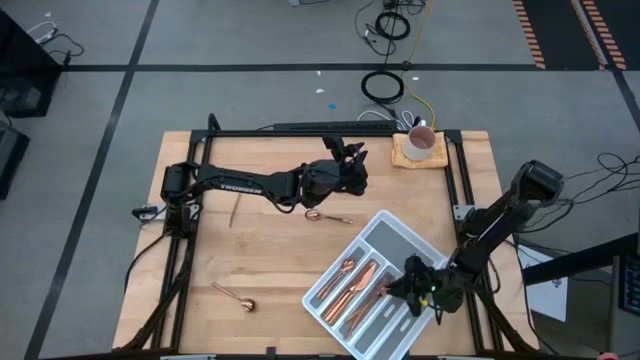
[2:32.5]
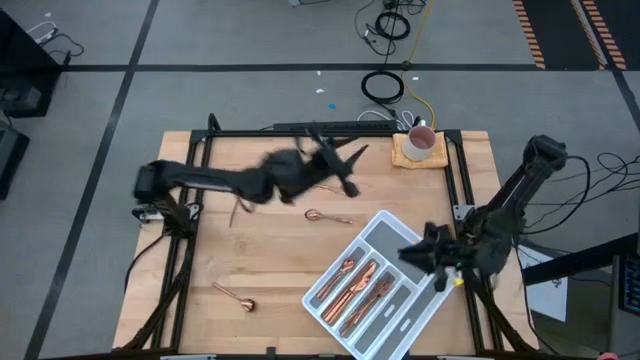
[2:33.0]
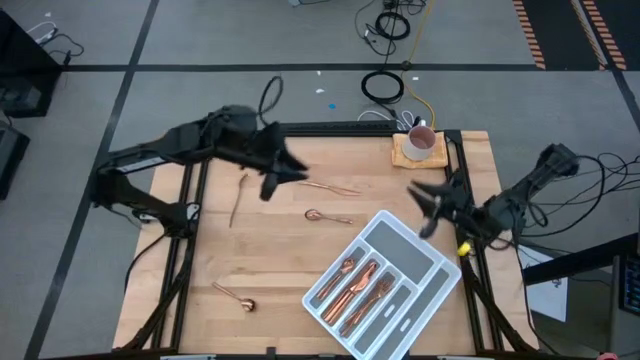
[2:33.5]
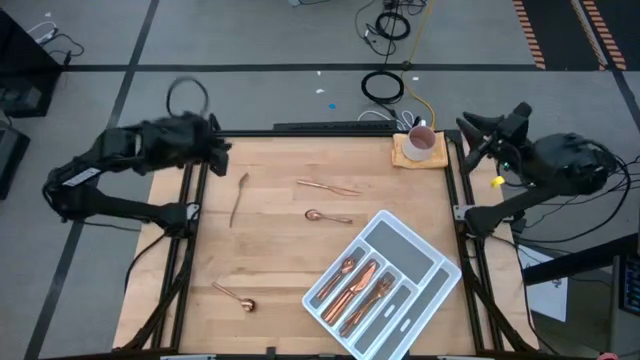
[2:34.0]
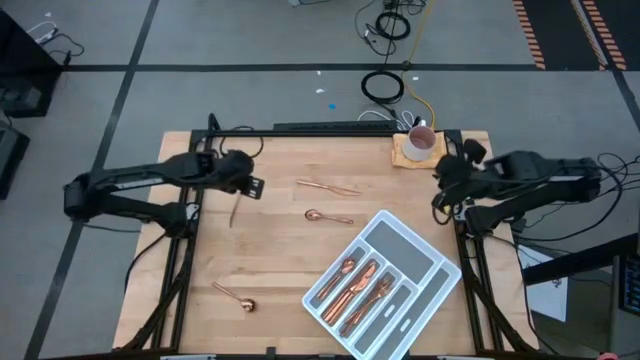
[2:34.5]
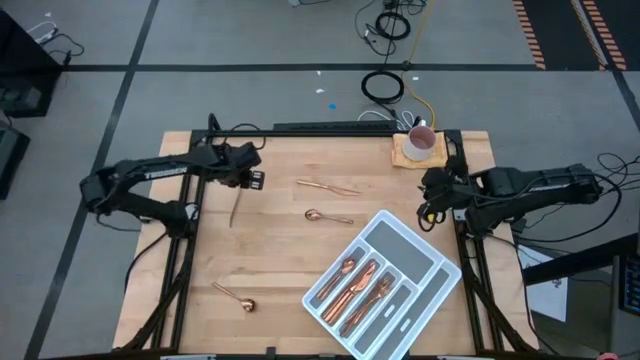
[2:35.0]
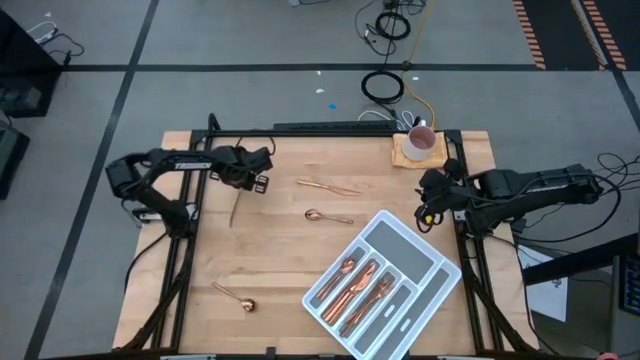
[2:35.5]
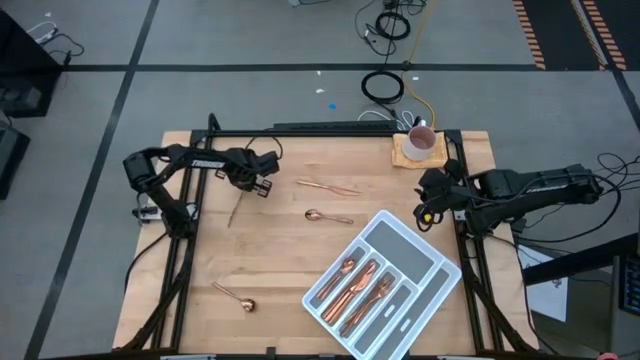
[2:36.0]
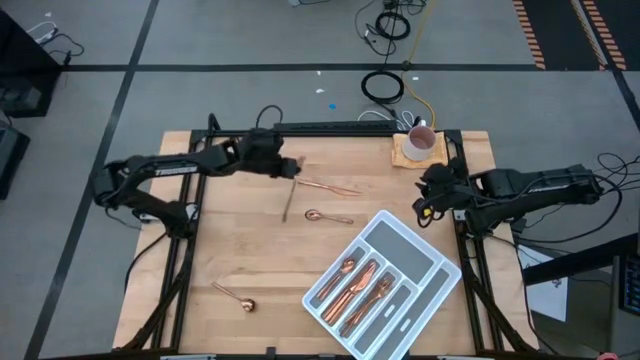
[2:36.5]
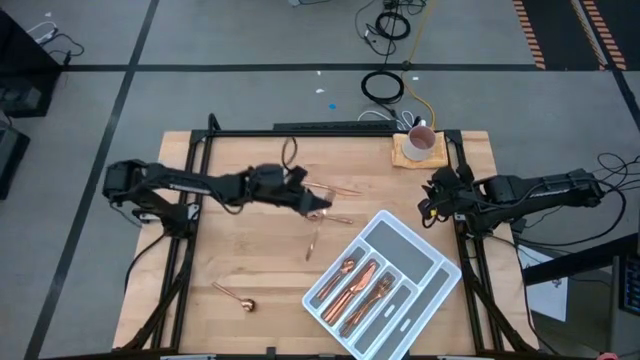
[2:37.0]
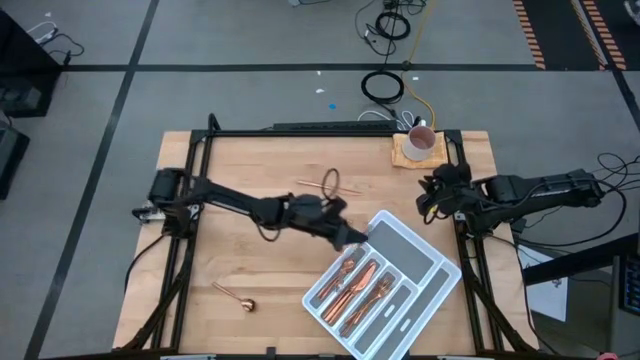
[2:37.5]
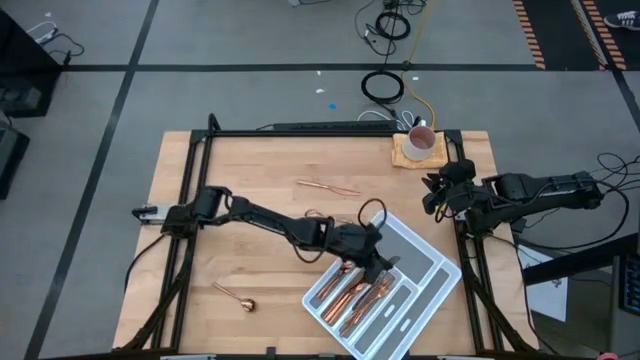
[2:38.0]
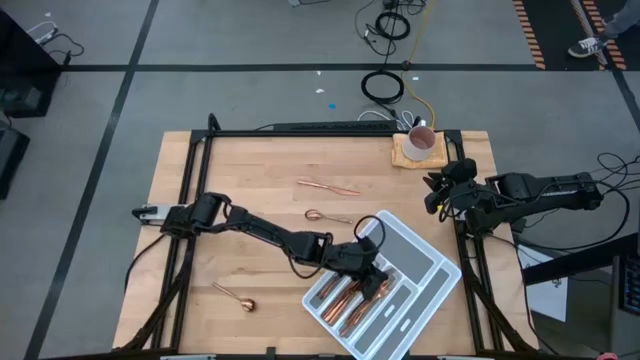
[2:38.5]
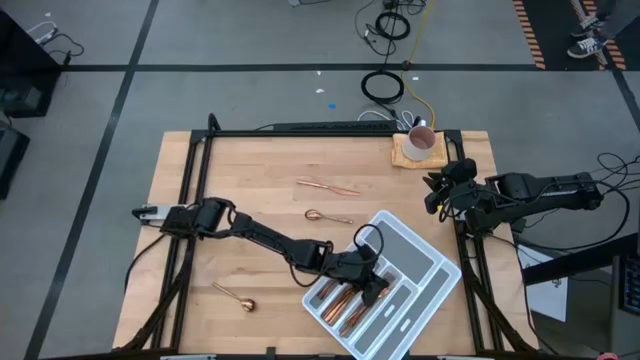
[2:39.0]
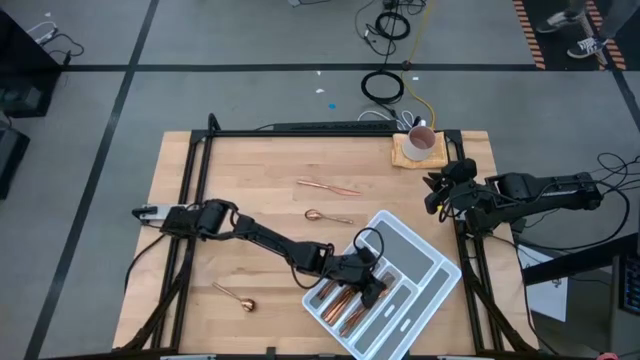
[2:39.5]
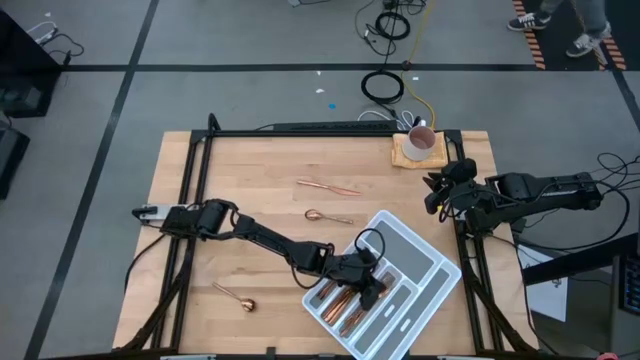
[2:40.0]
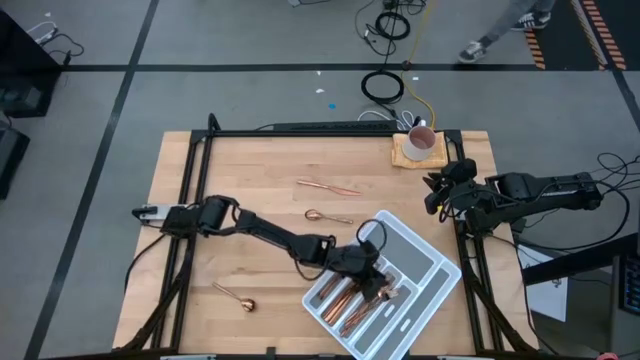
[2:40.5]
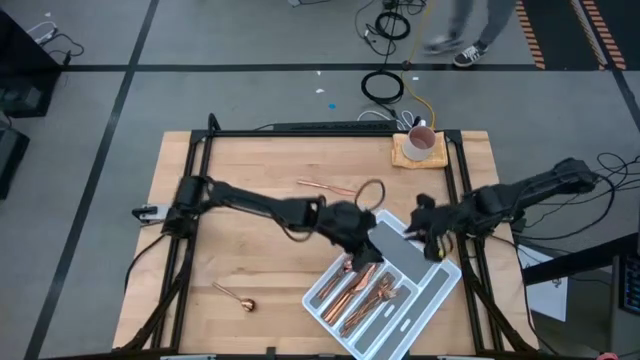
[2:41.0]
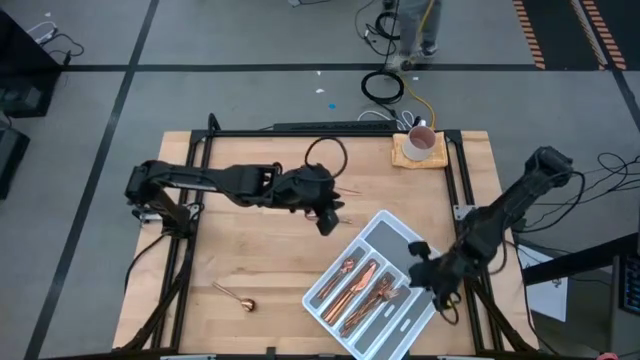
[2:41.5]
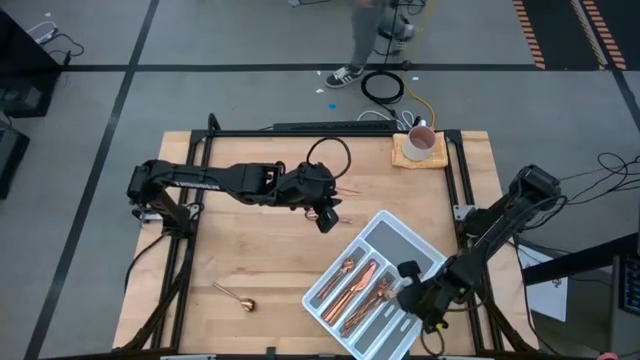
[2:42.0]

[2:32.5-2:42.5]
Task: Sort silverware
Put the gold fork into the cutlery tray with the other gold forks

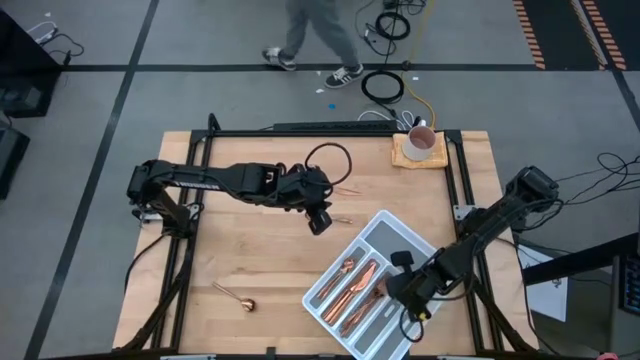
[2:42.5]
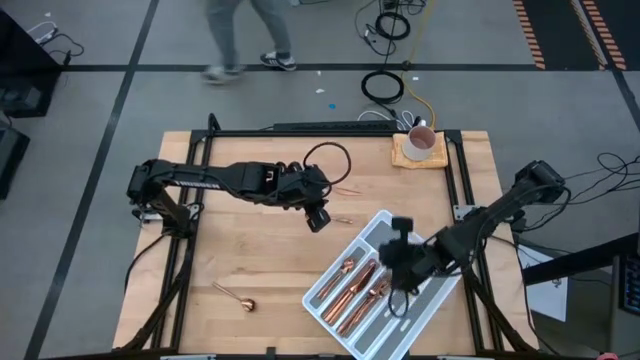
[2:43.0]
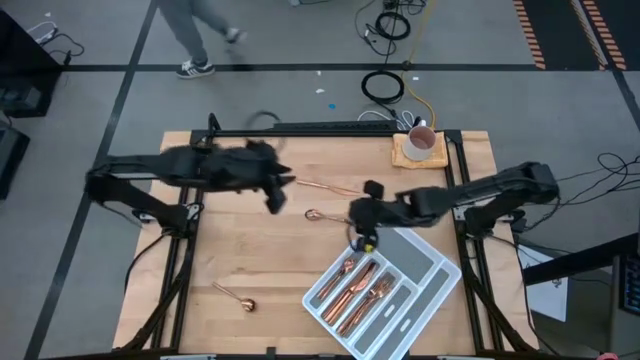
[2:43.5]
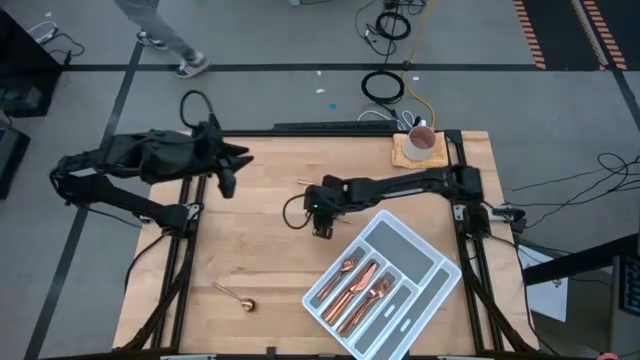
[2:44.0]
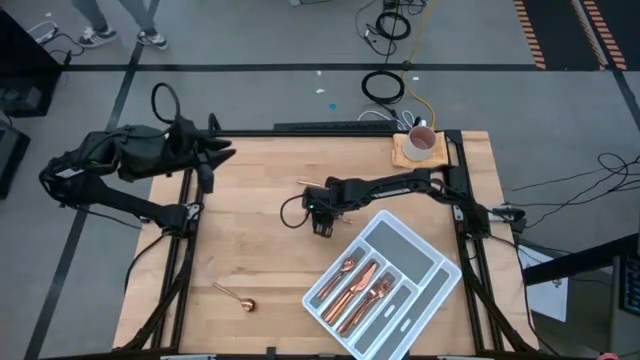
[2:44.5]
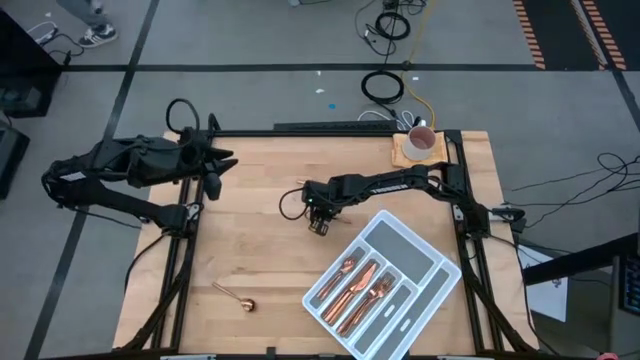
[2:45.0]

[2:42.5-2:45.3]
Put the gold spoon into the cutlery tray with the other gold spoons

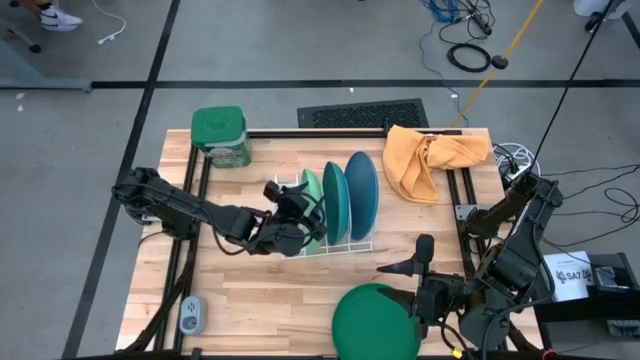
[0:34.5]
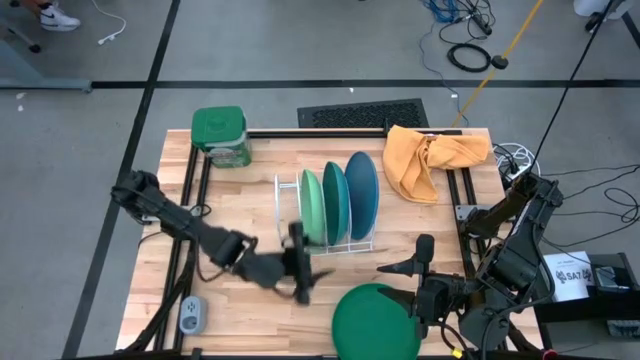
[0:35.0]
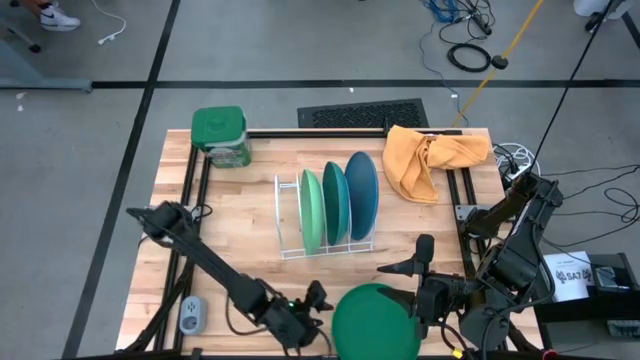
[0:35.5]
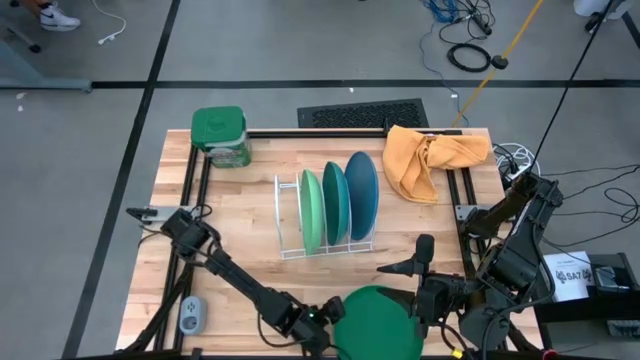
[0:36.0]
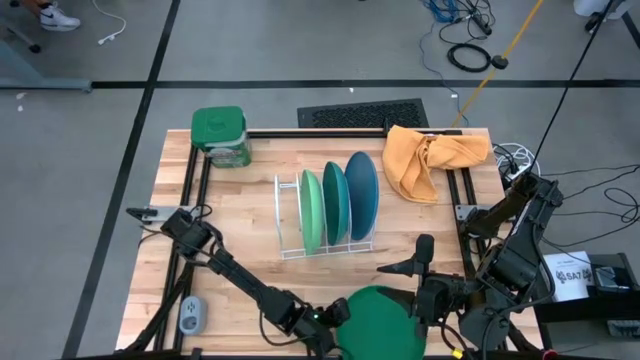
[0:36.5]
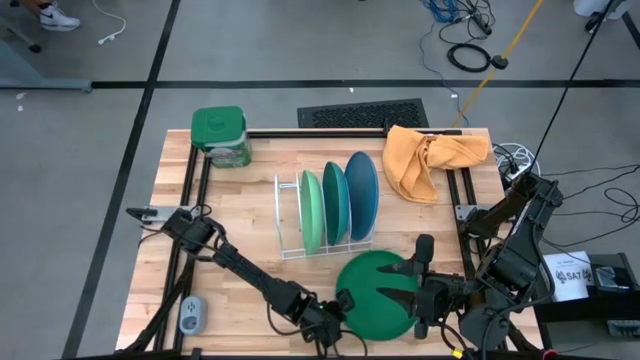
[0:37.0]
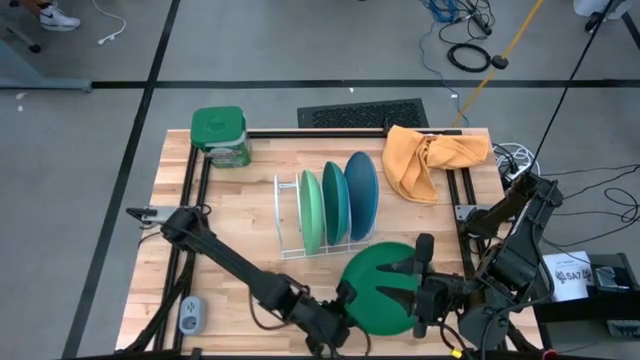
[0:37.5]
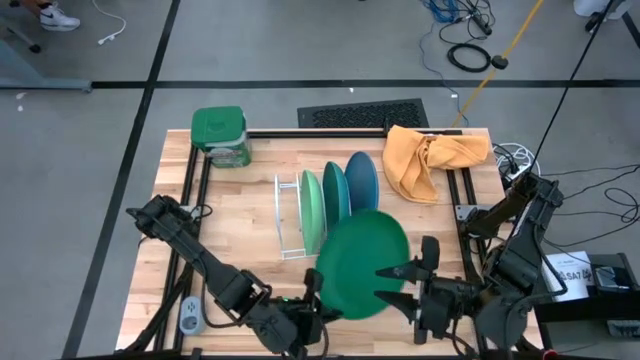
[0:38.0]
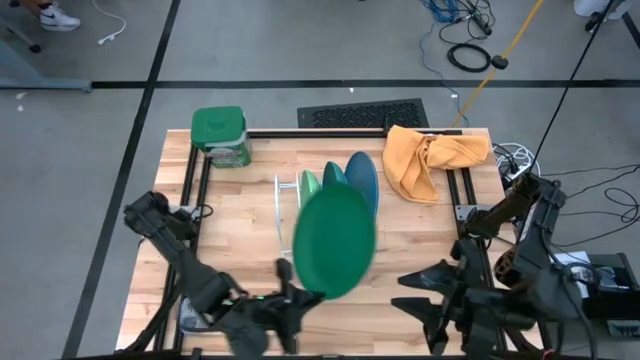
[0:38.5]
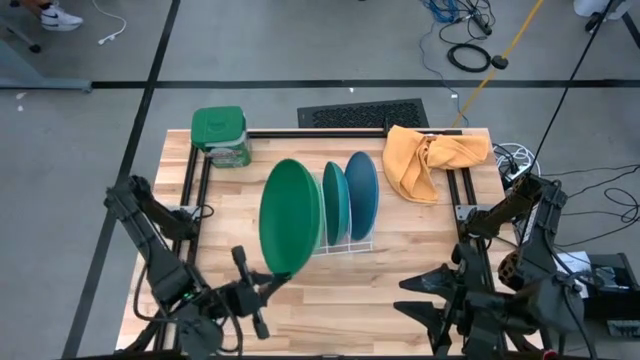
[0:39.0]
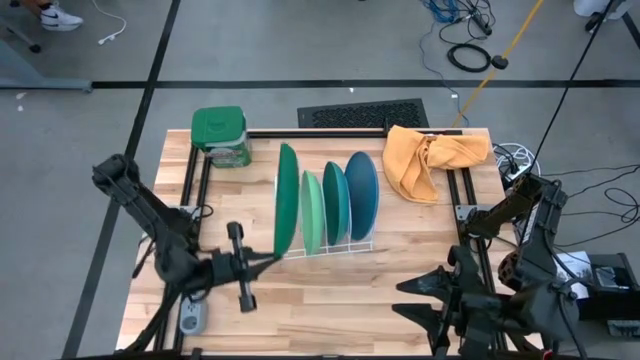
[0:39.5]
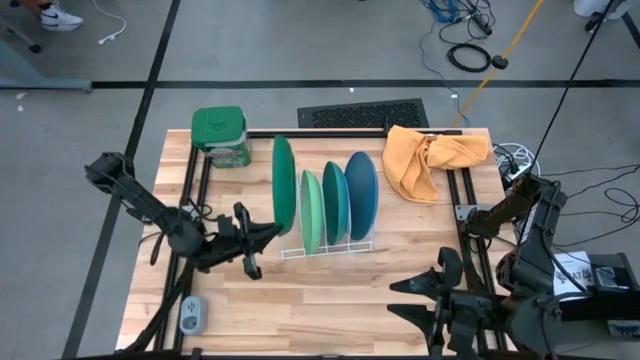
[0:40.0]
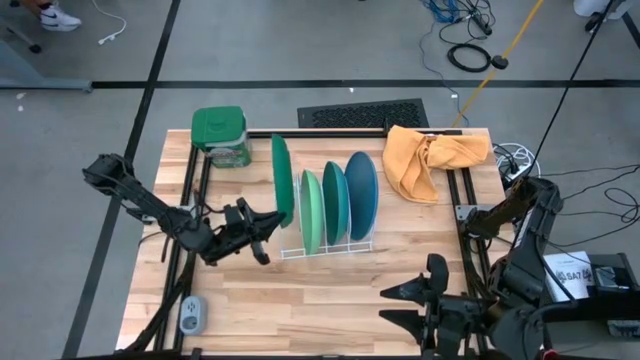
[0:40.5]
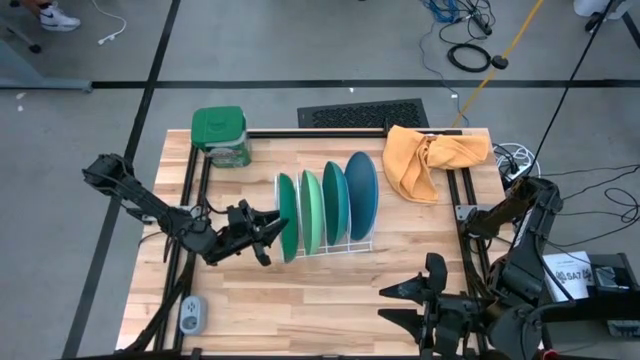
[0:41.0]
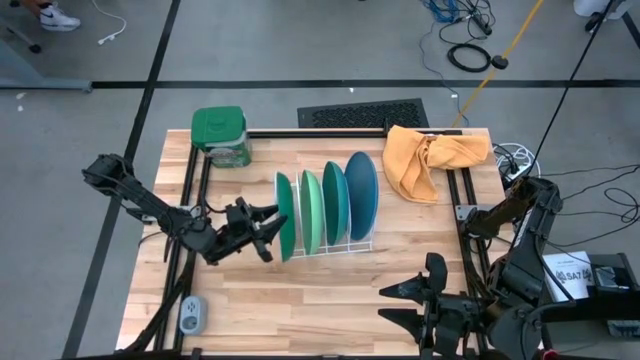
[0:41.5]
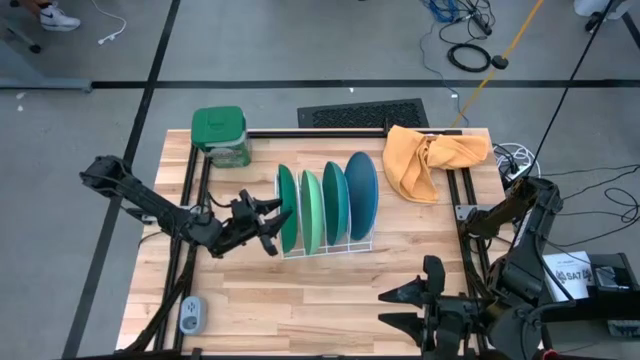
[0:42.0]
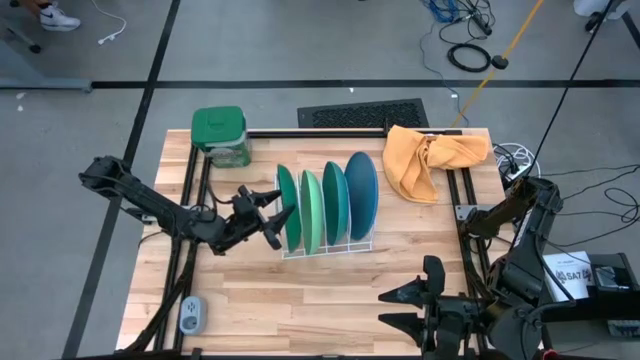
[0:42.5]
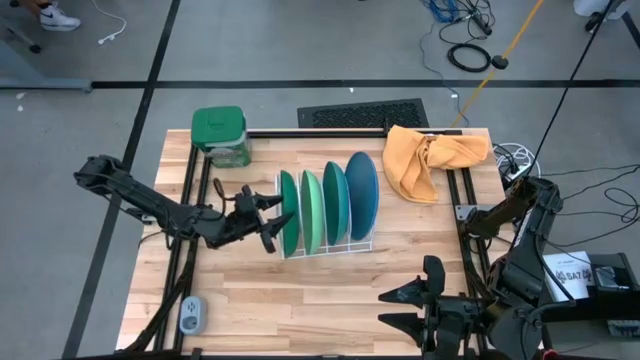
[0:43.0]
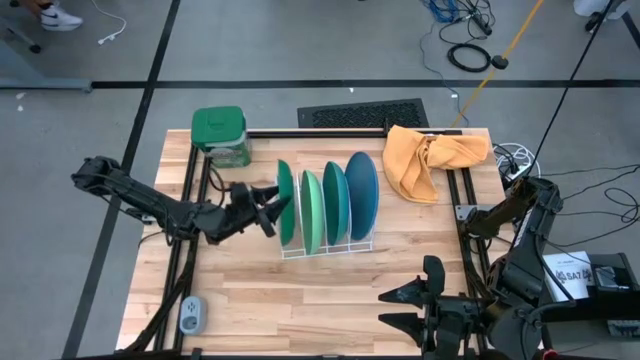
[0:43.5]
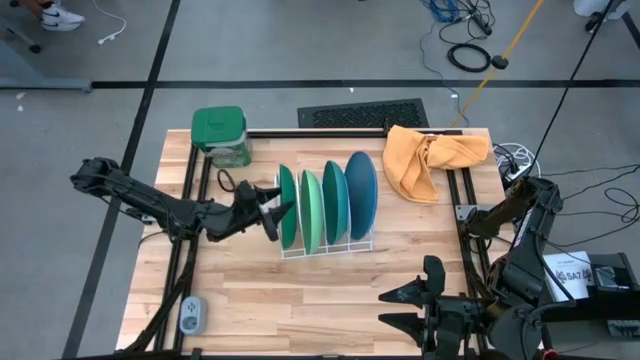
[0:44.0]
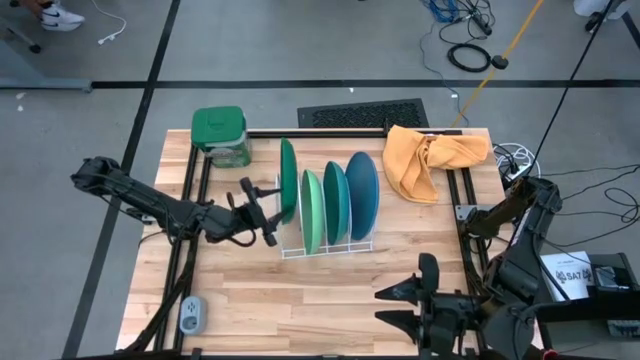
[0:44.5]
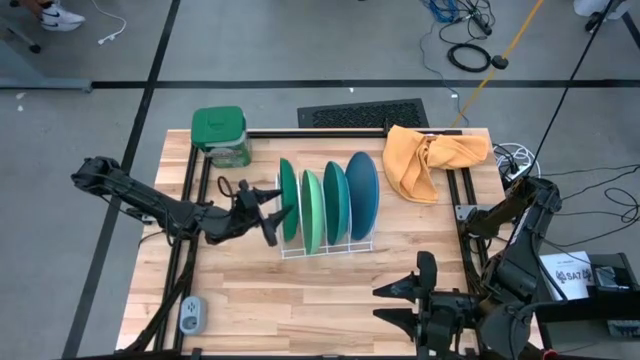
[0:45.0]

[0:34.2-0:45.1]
Task: Sort dishes
Put the green plate into the dish rack
